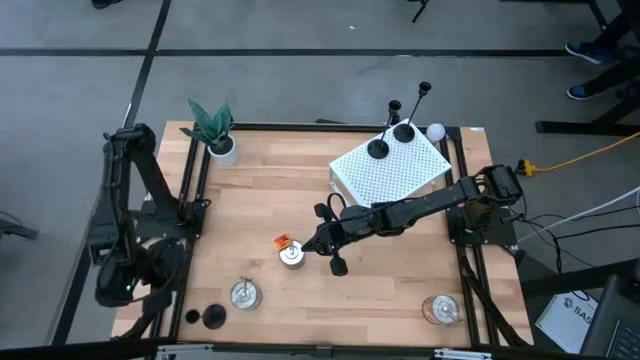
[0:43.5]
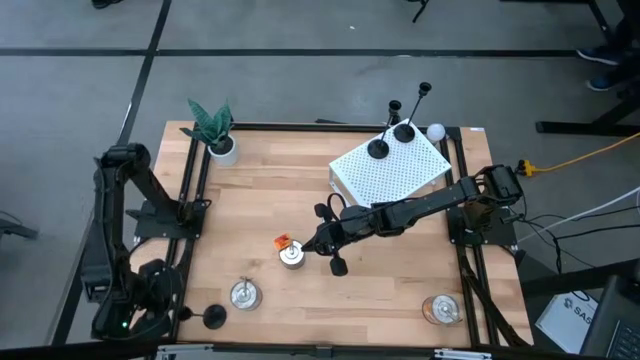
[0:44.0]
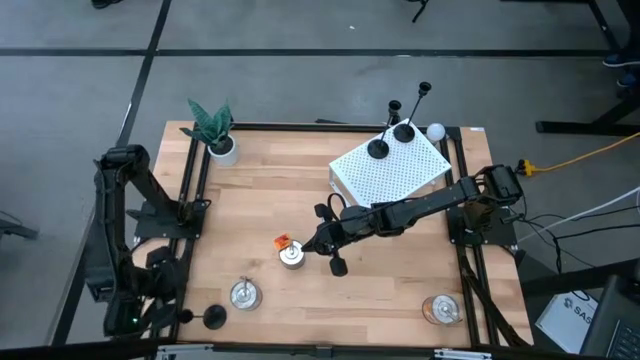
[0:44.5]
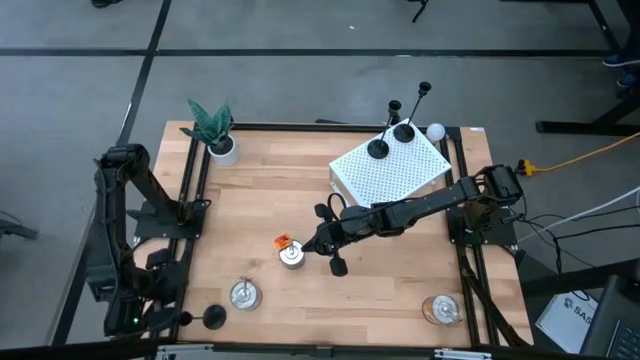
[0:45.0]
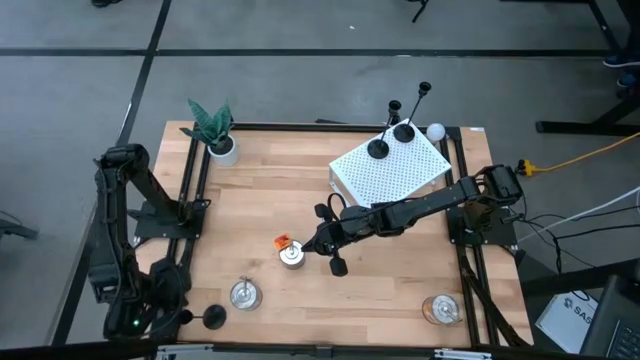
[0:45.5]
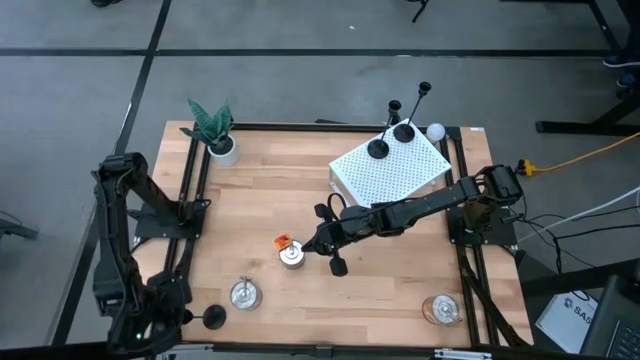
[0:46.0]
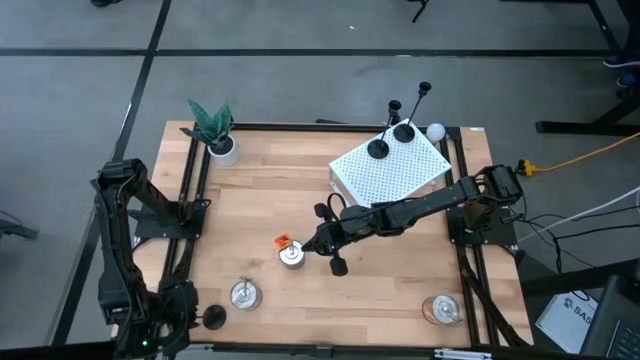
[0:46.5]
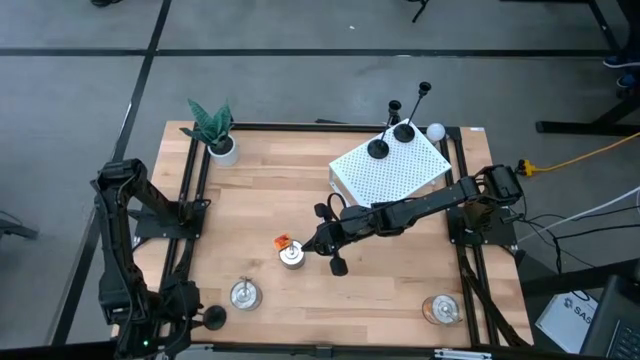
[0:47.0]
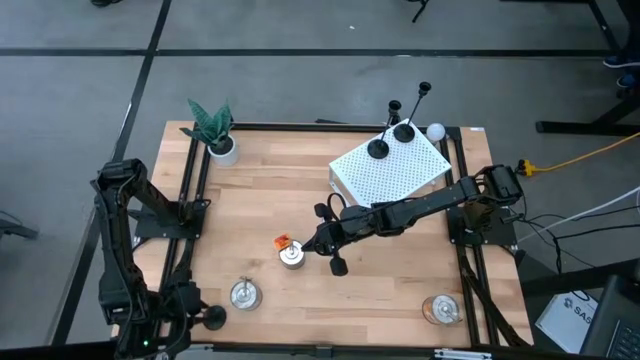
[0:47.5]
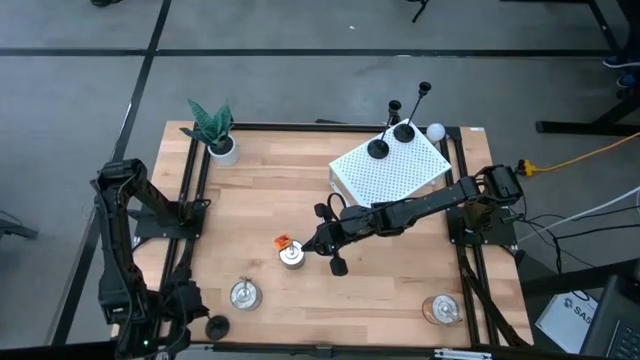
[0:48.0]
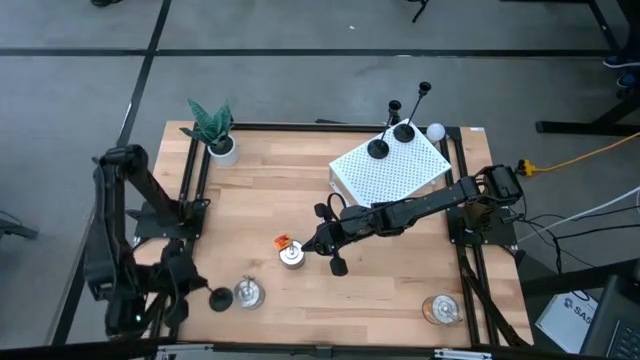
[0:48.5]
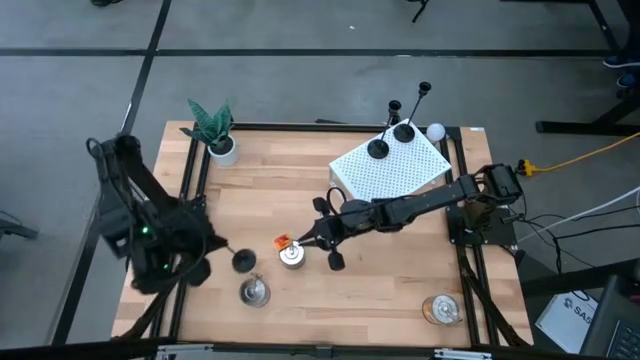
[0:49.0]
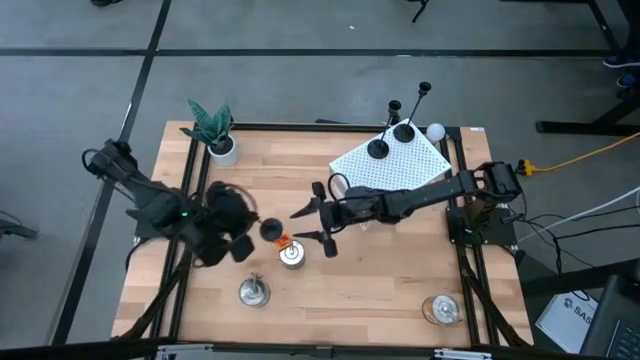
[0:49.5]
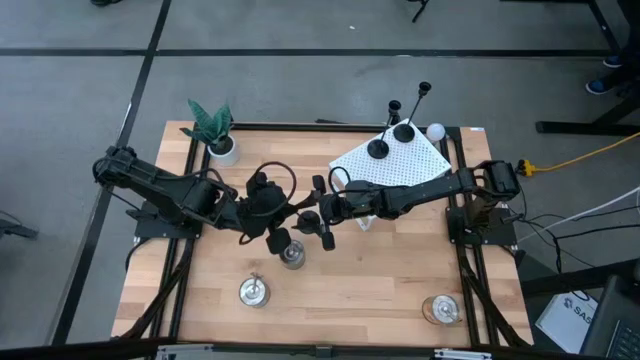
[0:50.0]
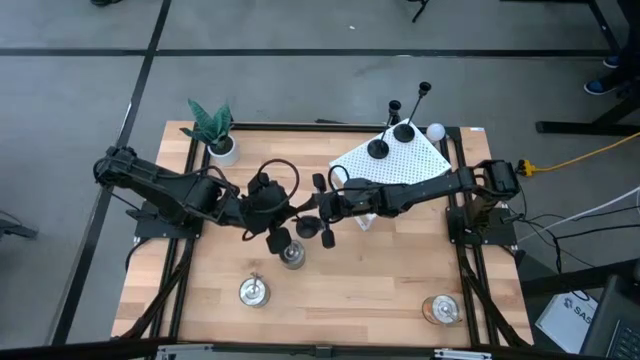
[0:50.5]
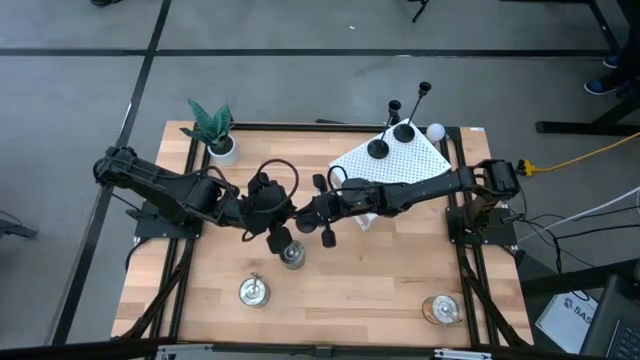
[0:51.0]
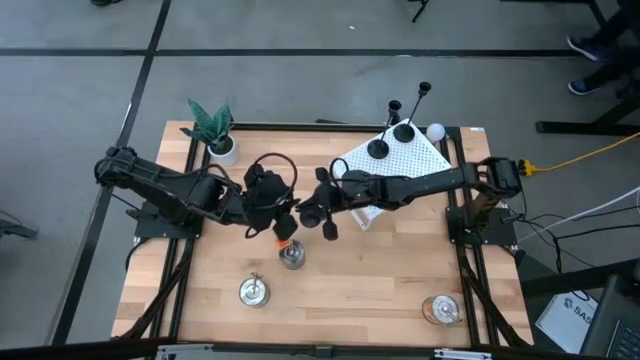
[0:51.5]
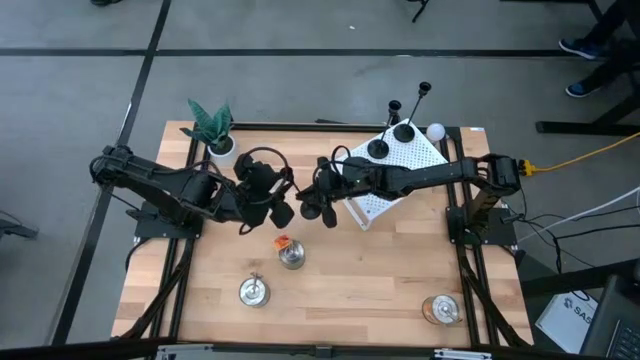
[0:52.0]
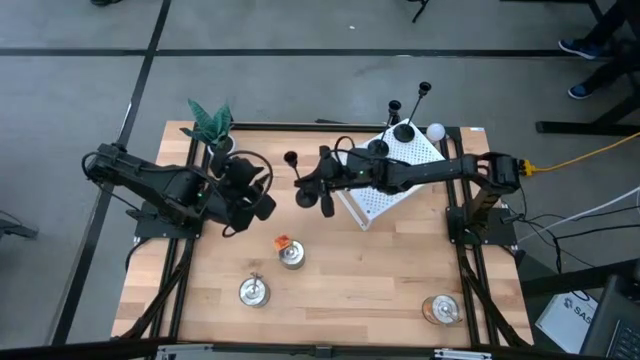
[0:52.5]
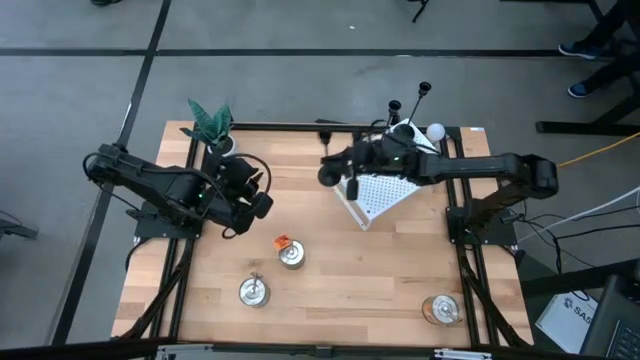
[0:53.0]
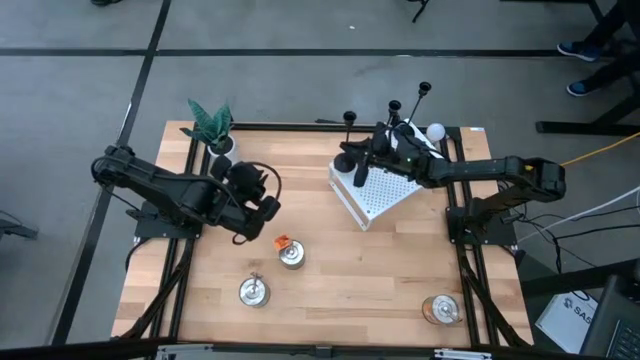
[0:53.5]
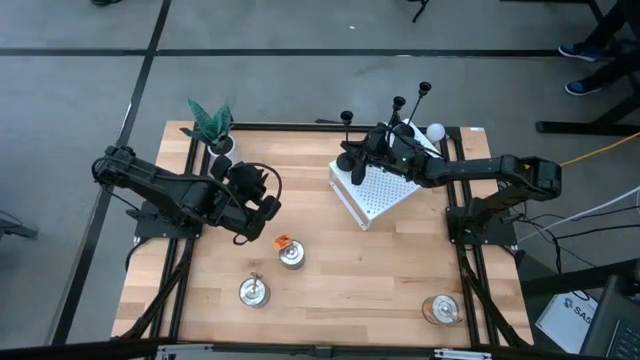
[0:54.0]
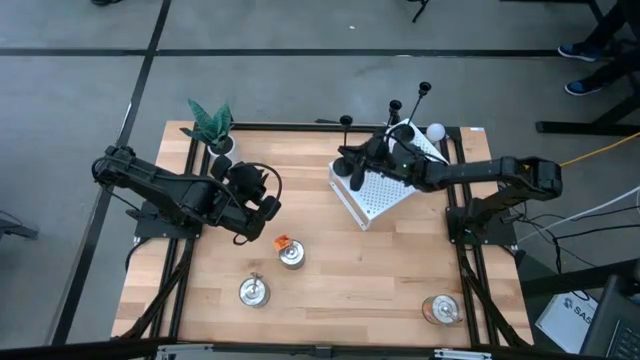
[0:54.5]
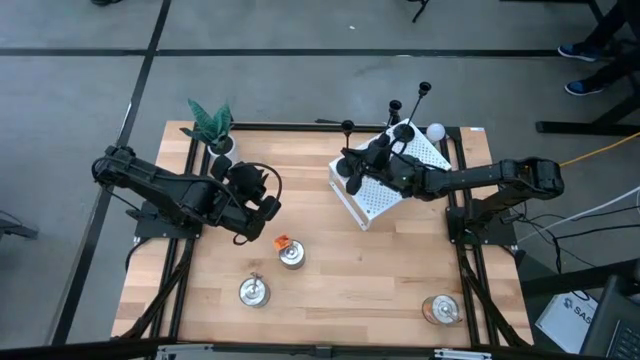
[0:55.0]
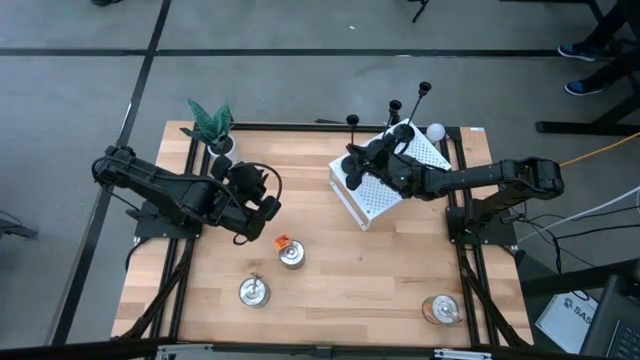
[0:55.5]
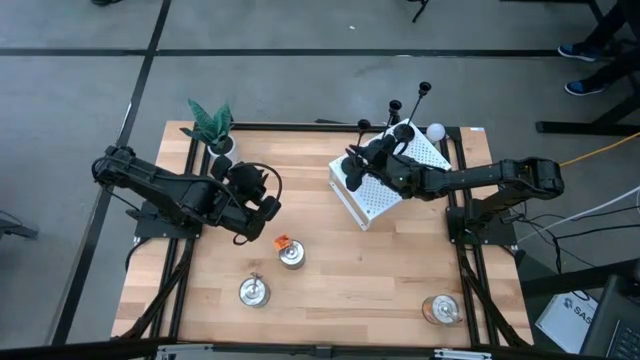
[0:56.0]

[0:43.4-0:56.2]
Task: Pick & Place candle stick holders
Put the black candle holder on the shelf aligned with the other black candle holders

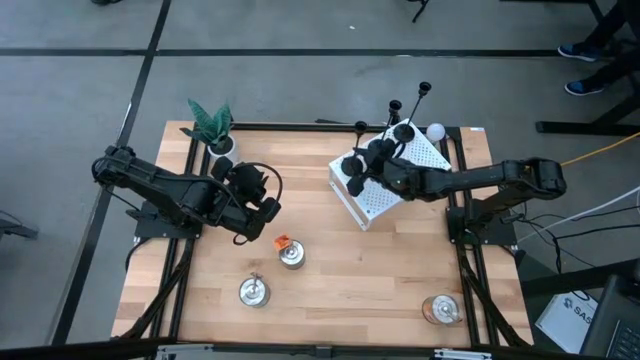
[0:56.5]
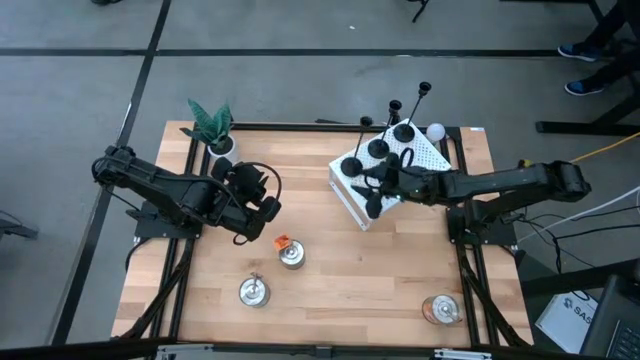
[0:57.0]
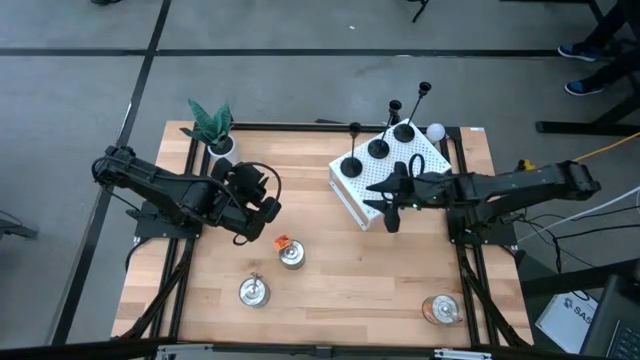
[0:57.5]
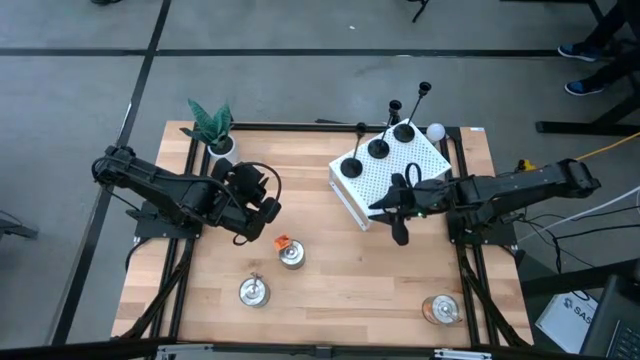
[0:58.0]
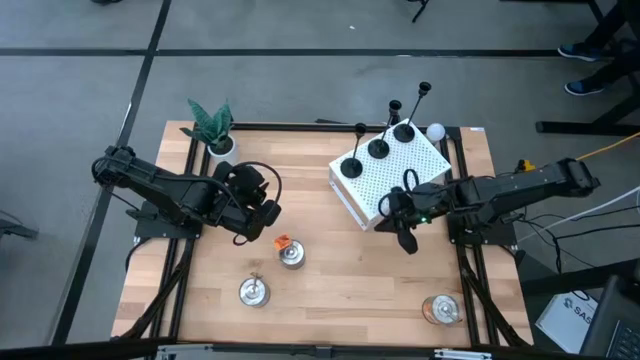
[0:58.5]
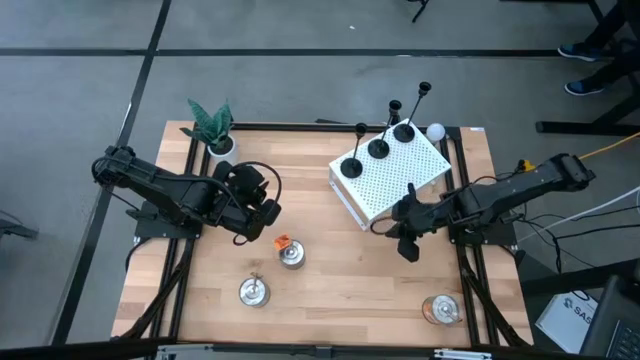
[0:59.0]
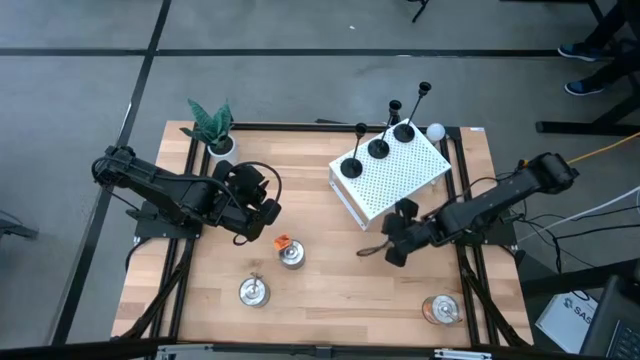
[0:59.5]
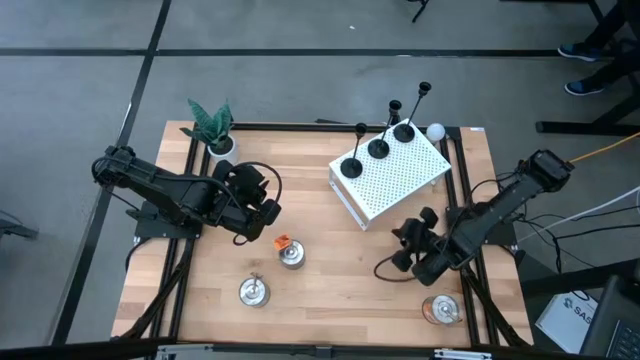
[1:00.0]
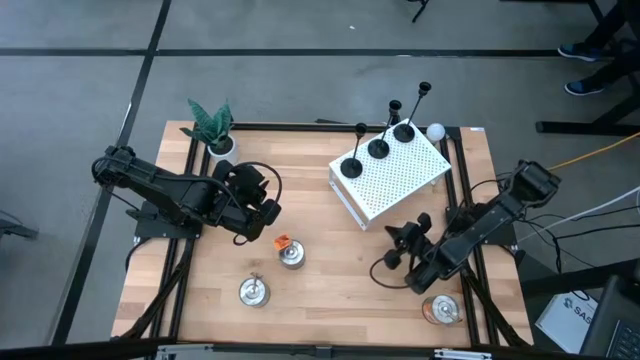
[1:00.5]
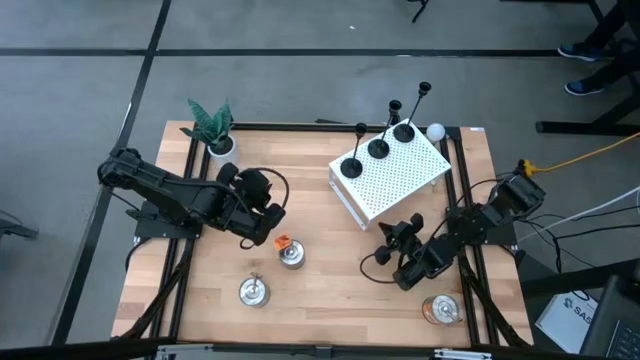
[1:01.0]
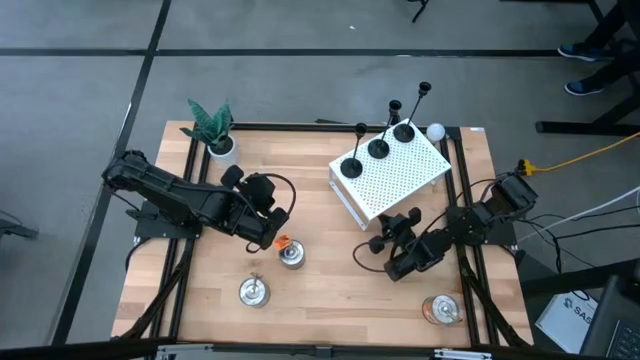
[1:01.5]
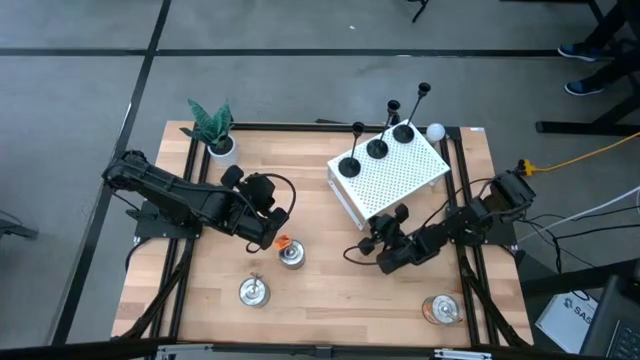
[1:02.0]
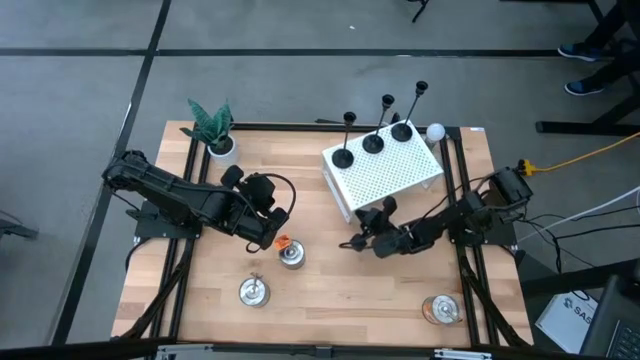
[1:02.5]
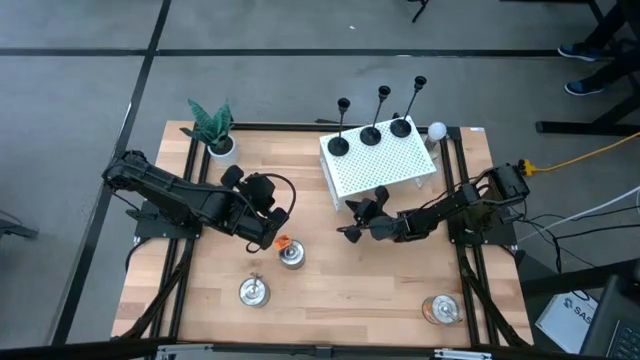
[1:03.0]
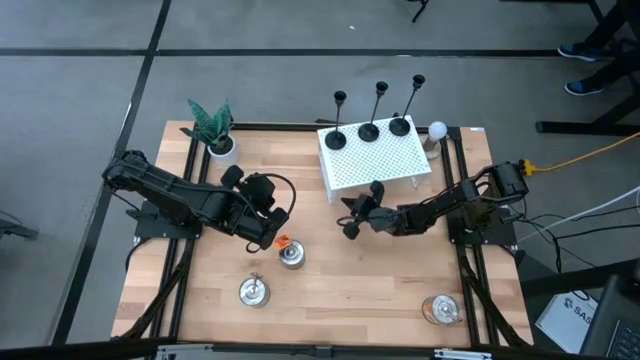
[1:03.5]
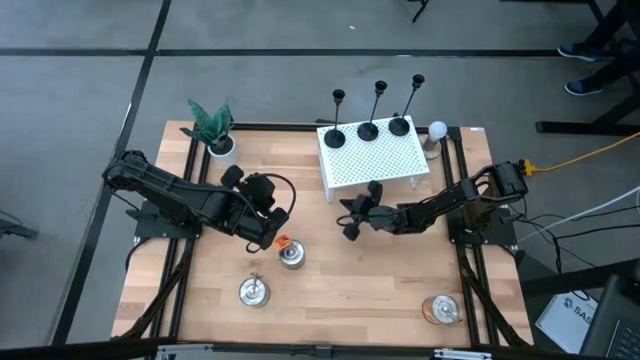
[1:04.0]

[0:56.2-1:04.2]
Adjust the shelf

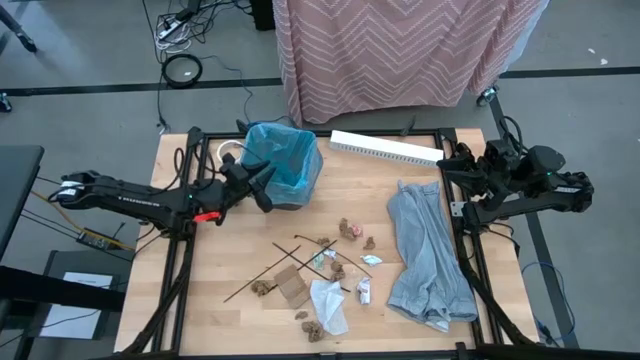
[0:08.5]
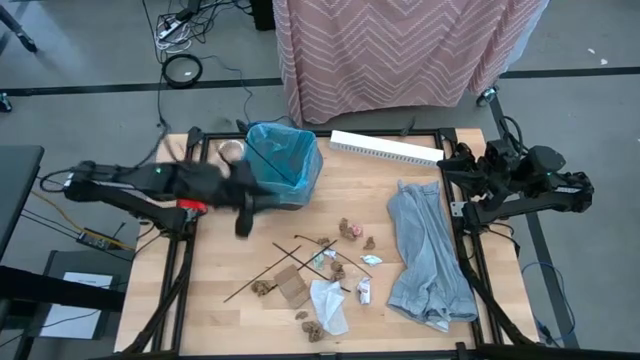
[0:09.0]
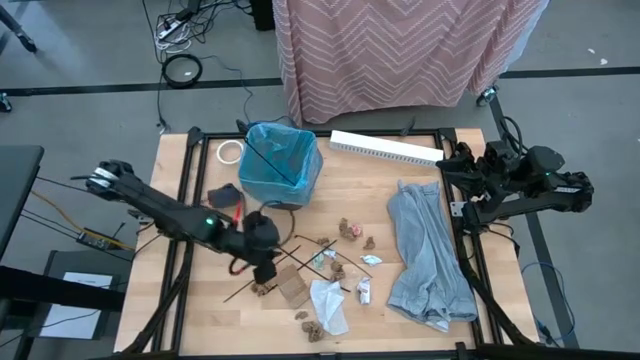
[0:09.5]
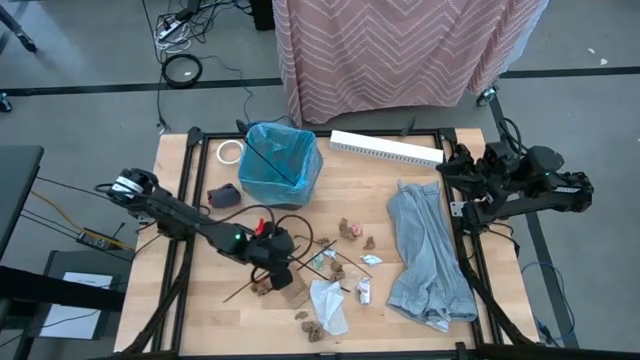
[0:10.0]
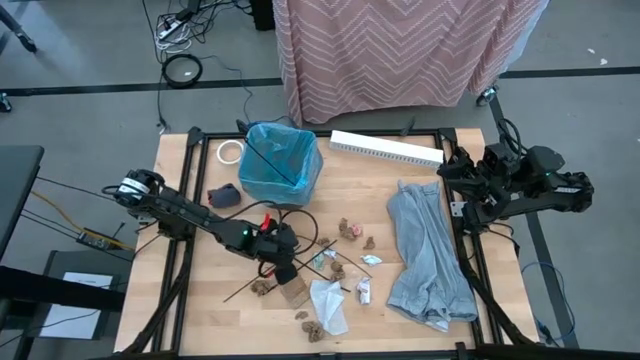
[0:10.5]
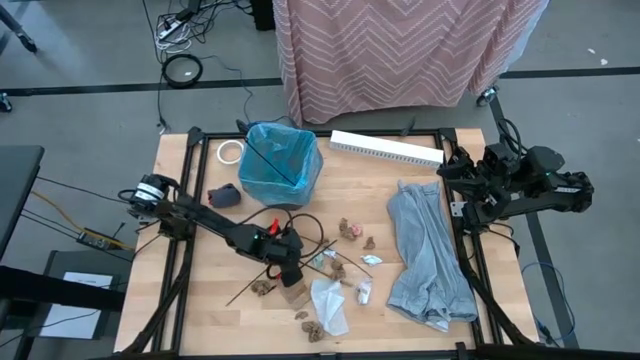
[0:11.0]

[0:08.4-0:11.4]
Task: place trash/remove bag and relplace
Put the black zip tie into the black trash bin
